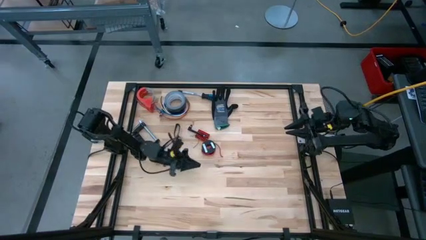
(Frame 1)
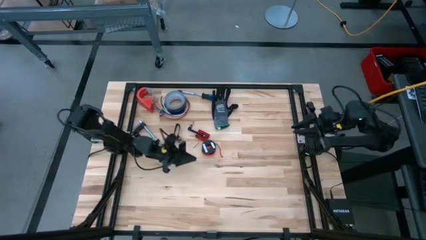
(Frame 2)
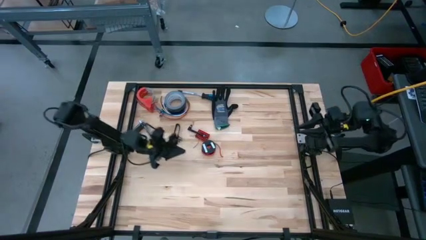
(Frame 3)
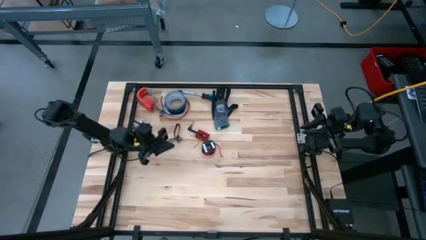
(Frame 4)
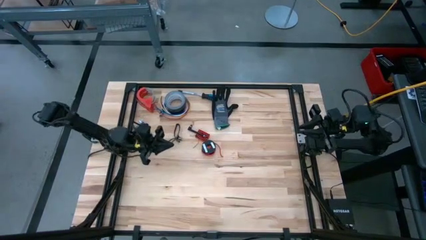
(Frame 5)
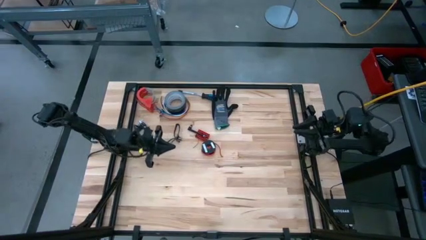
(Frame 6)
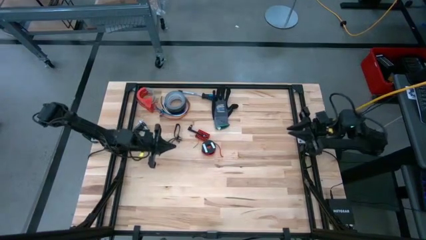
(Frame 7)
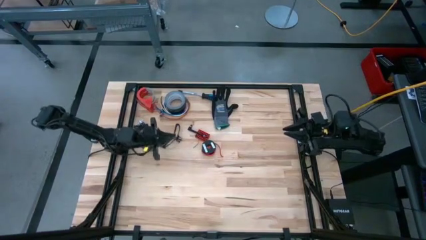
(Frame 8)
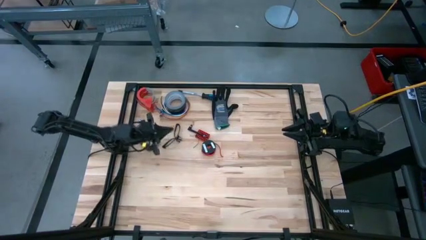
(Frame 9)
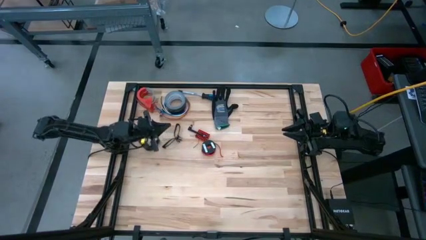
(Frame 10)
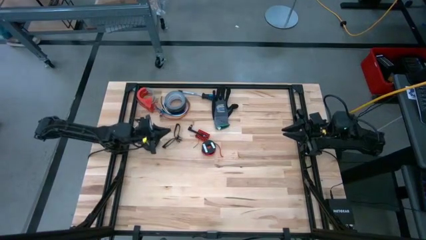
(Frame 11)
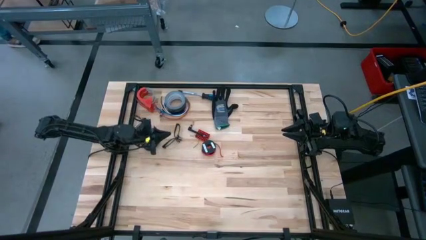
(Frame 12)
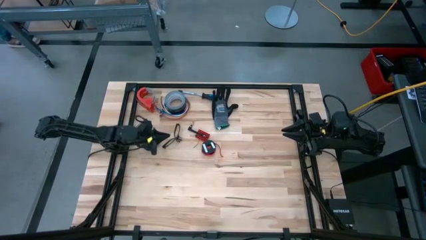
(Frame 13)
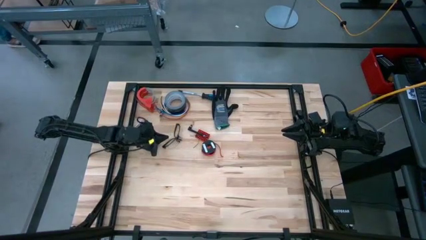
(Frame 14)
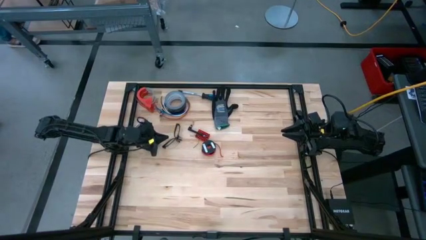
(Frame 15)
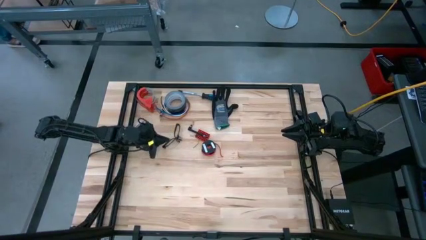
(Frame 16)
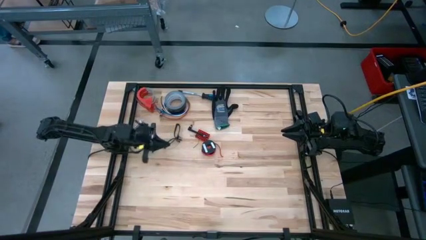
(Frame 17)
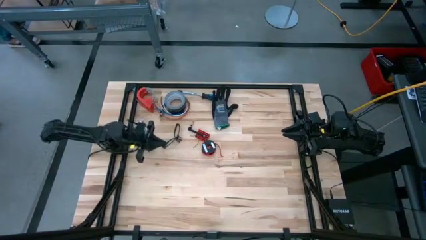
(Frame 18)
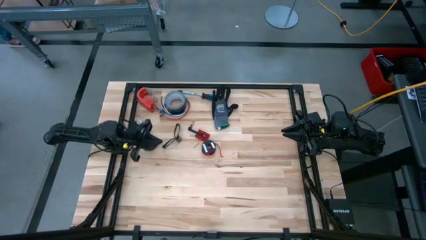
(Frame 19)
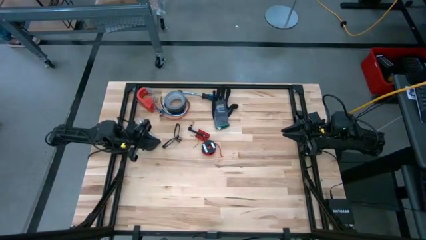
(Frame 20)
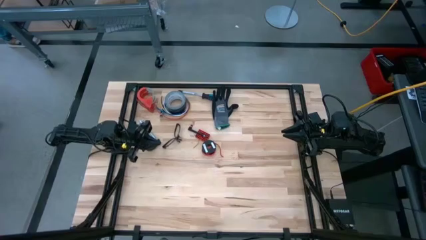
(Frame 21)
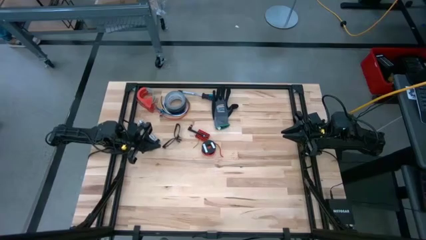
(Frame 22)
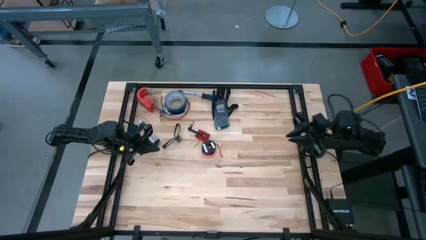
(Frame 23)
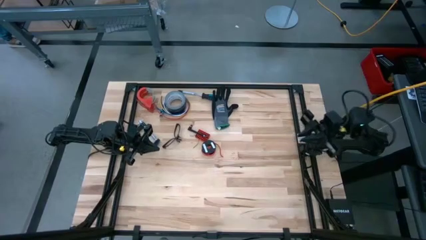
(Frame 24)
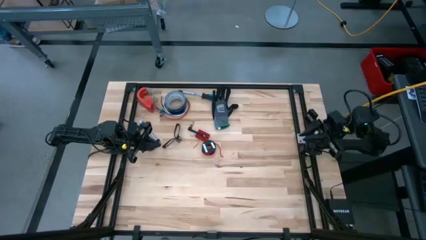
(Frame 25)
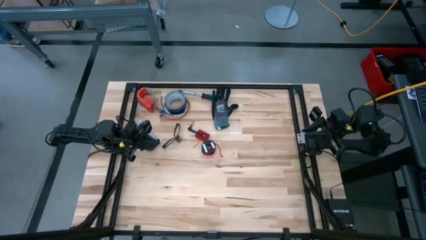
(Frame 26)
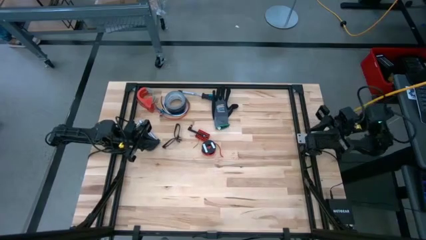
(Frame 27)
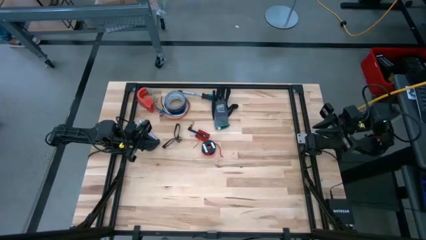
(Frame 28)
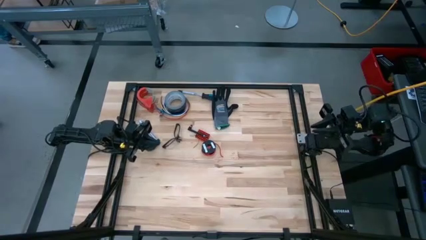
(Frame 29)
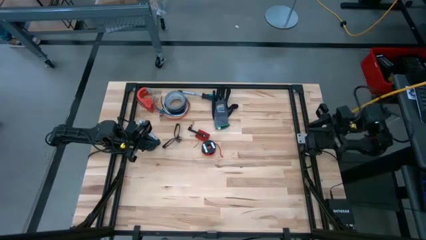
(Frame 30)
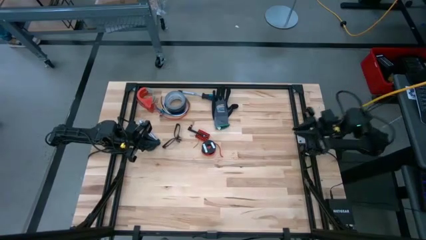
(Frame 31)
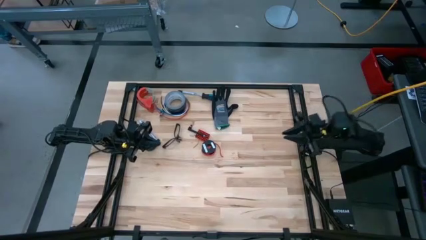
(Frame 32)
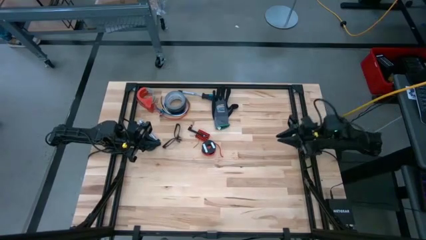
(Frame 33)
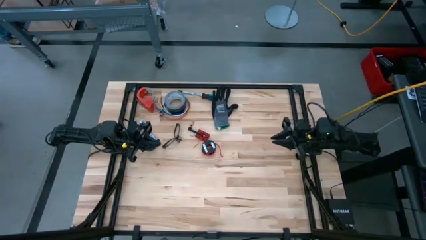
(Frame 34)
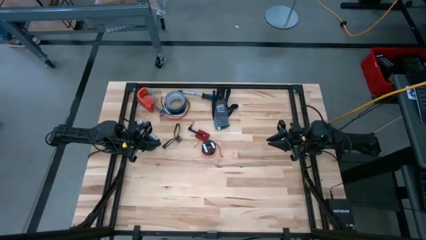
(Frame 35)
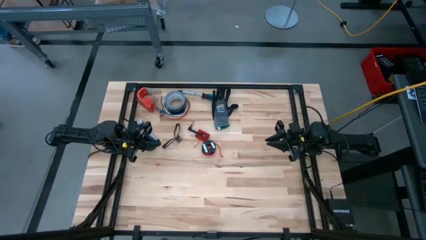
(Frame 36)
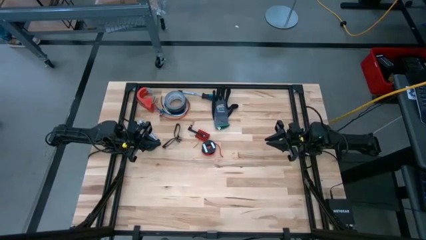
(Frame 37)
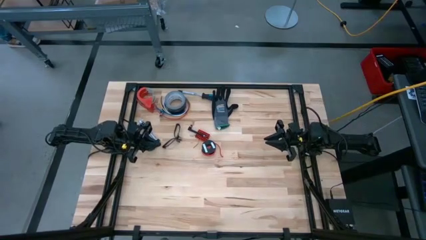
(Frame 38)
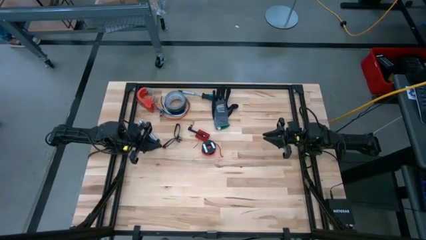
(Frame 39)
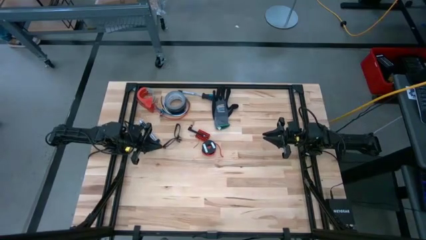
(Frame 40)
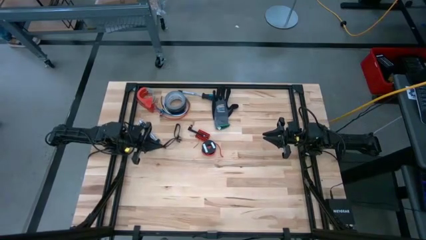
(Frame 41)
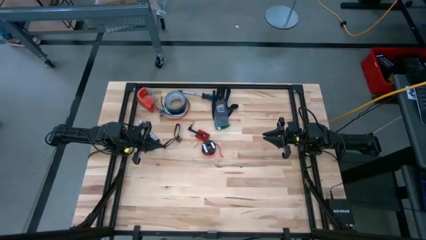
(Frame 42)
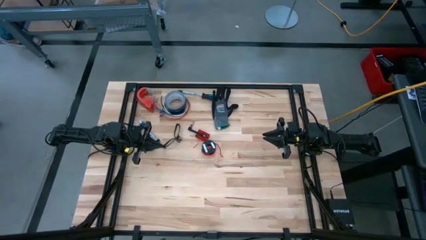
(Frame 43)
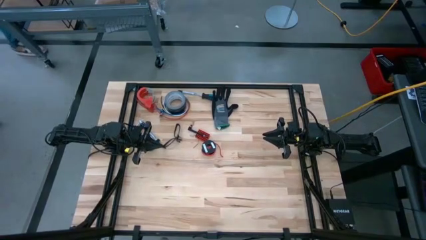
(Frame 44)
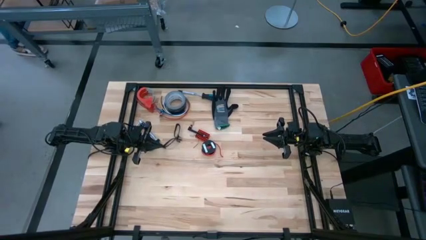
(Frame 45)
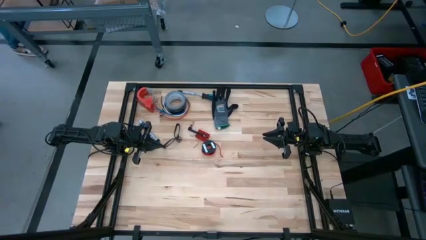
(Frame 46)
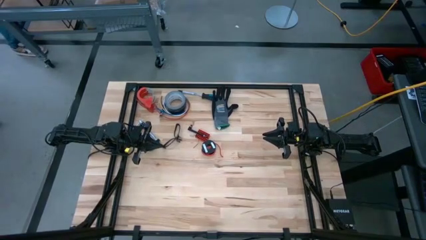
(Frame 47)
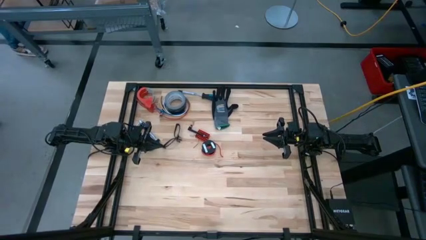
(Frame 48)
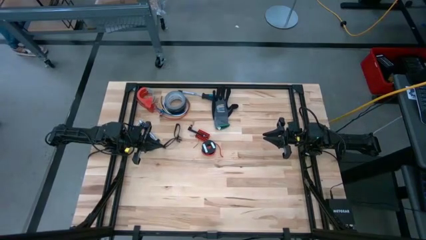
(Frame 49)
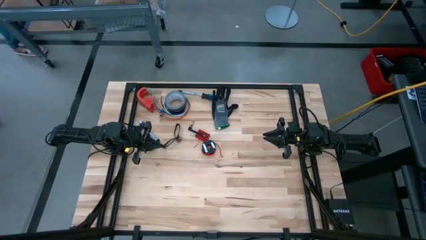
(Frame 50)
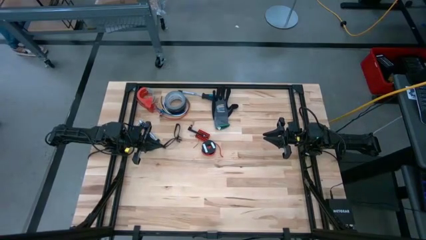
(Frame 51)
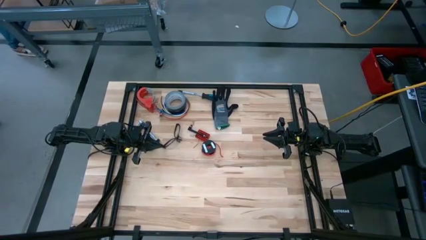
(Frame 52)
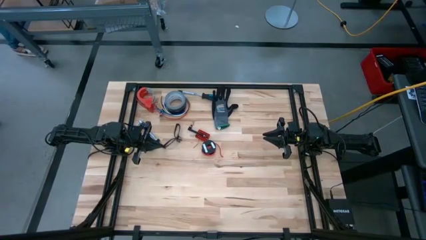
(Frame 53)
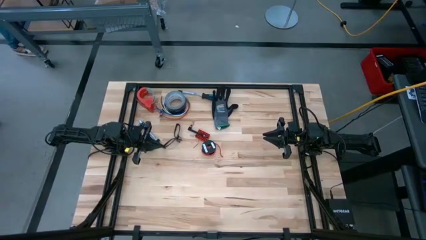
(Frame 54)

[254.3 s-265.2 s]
Task: Coil cords
Return to Home Position

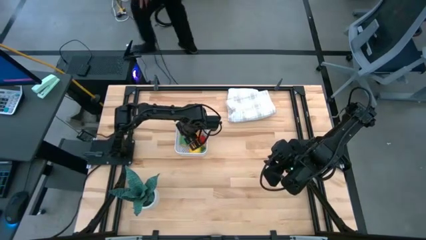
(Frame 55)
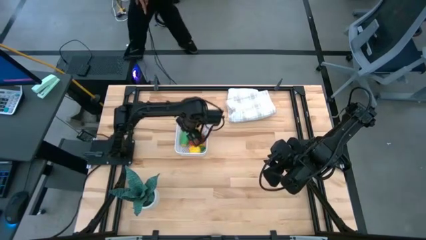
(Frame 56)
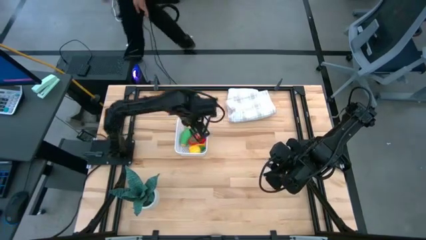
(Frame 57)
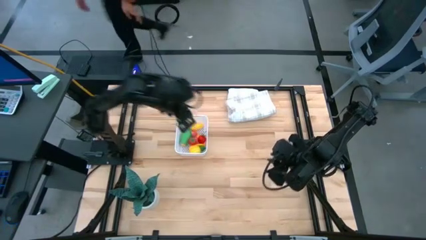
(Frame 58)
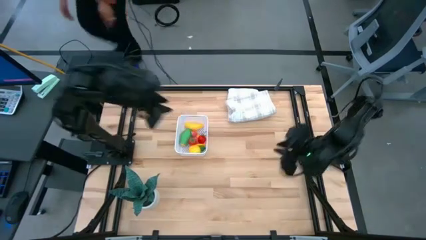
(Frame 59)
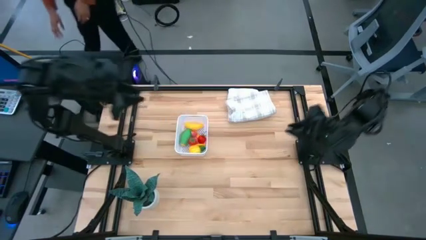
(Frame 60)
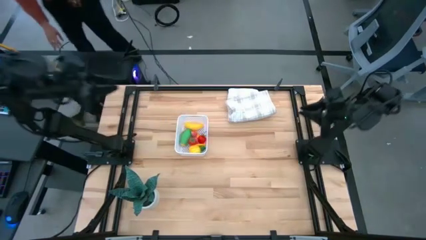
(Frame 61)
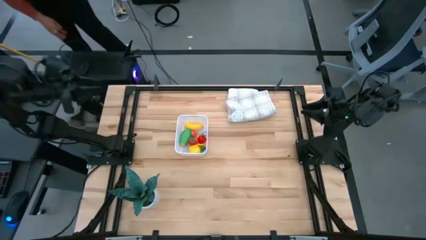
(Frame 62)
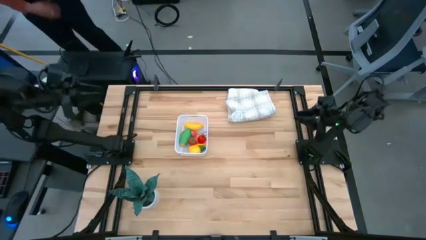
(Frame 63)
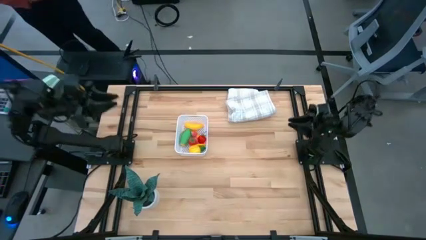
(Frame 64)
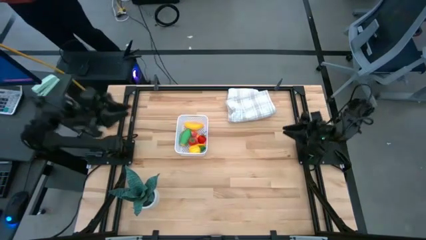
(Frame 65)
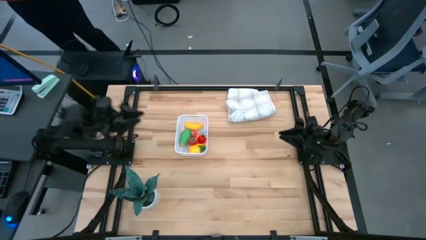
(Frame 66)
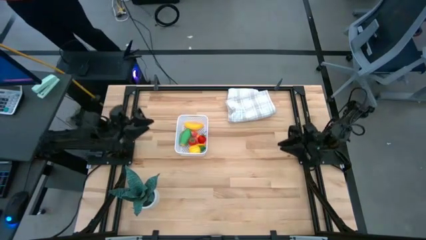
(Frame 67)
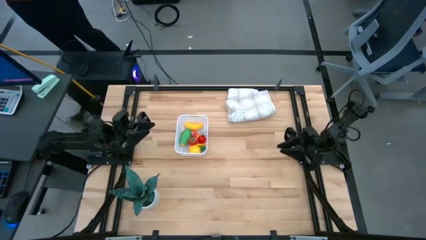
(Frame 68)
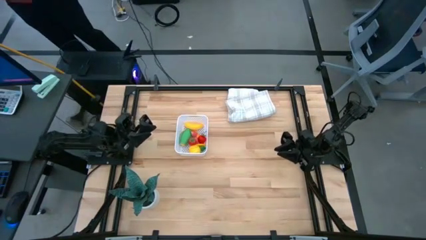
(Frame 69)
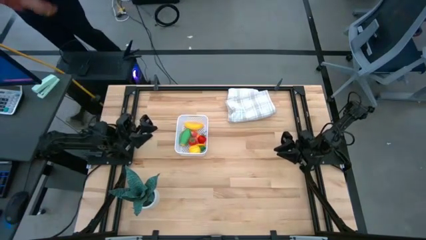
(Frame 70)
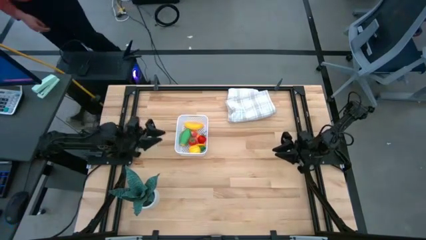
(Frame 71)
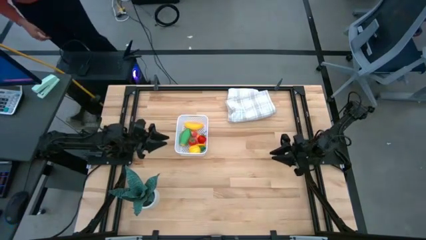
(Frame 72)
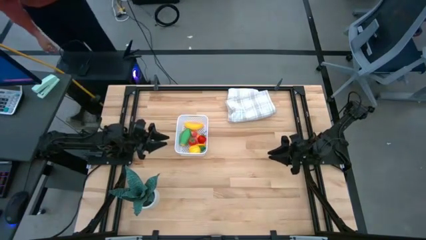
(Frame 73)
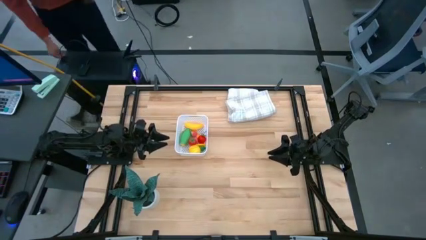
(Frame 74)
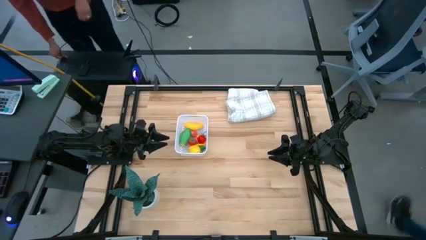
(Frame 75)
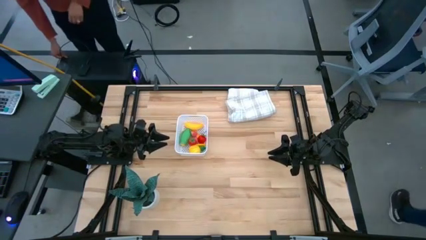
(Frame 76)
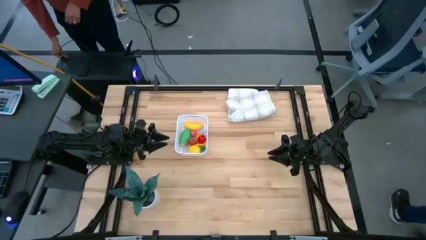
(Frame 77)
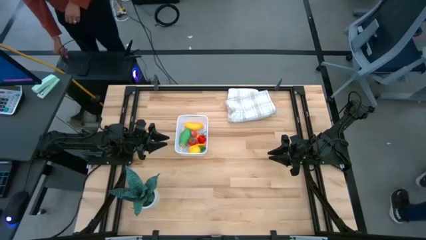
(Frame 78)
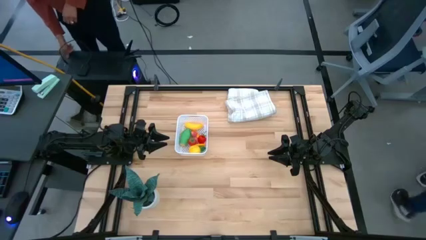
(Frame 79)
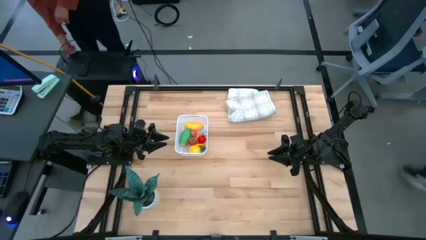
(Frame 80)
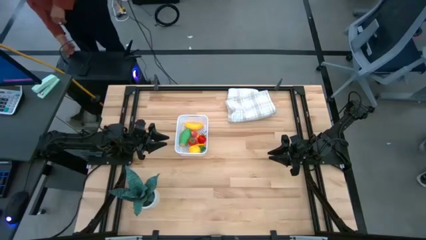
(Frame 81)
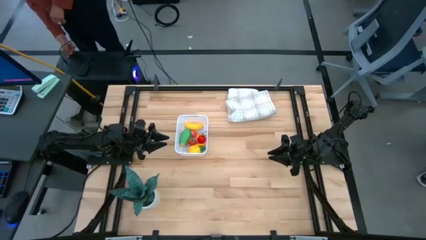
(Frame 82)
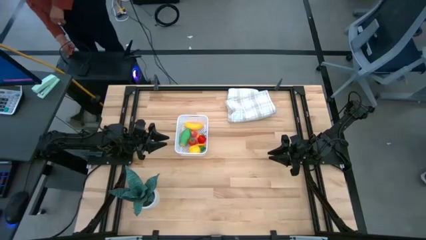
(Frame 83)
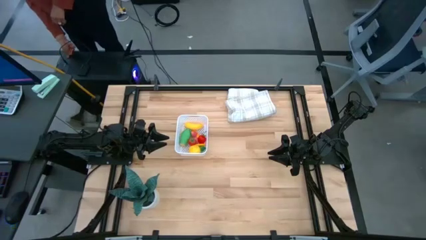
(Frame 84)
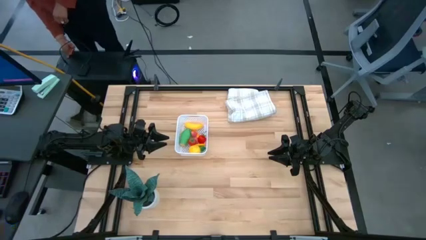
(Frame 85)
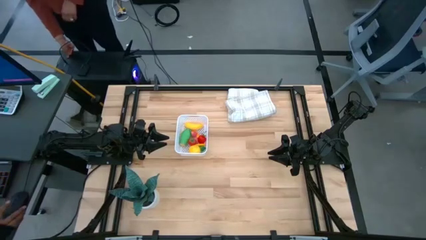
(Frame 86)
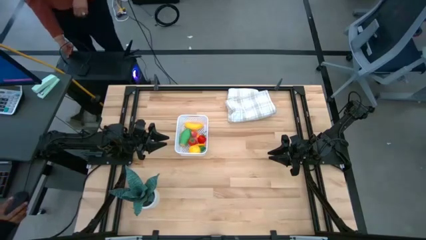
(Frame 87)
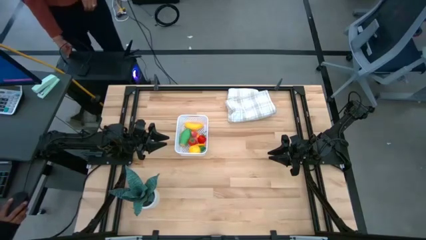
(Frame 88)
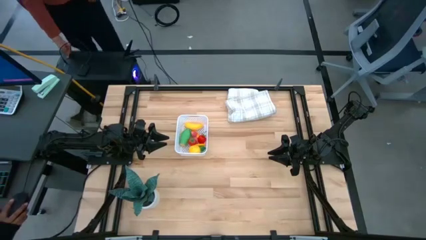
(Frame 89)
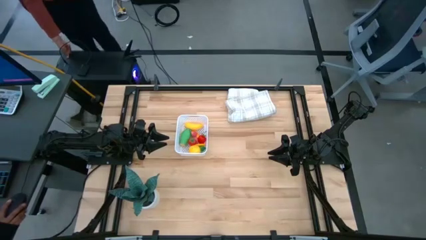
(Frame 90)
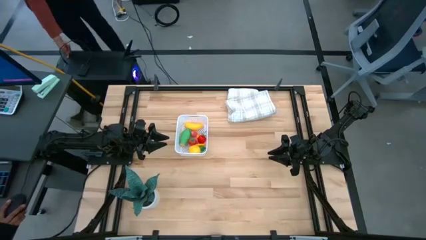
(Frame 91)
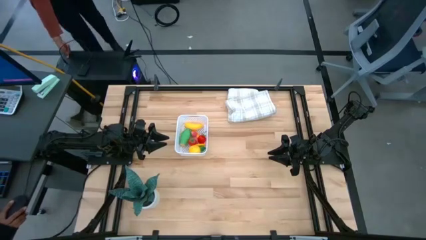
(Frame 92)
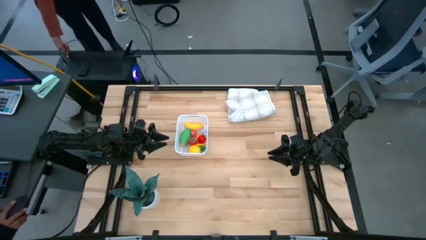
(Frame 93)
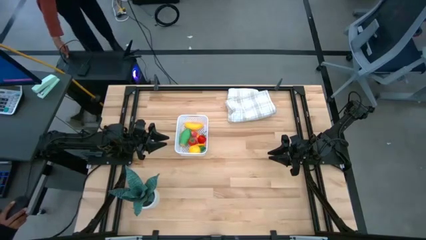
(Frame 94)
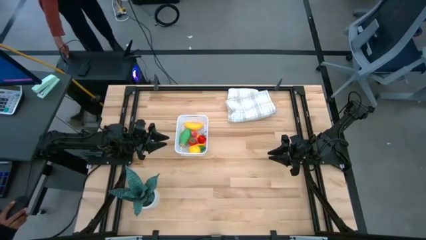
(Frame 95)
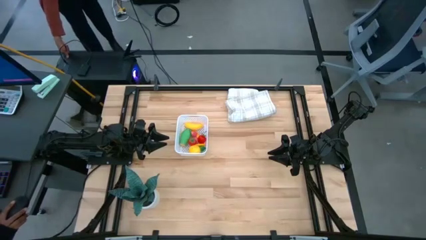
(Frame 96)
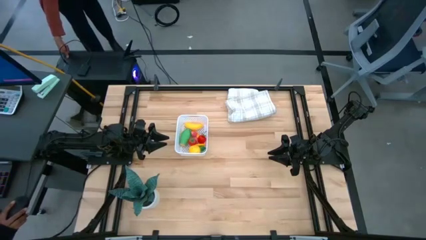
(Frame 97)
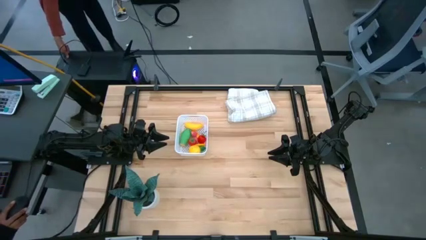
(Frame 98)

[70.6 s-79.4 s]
Task: Pick and placing Produce into tupperware
Return to Home Position
